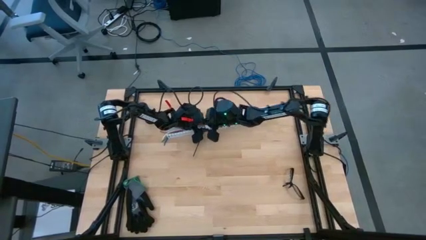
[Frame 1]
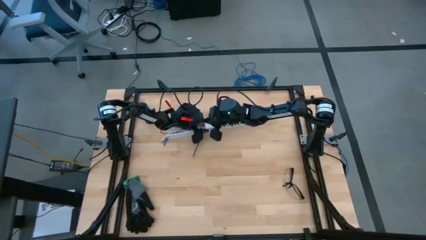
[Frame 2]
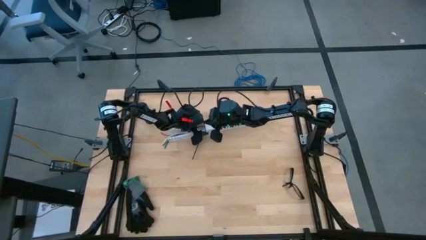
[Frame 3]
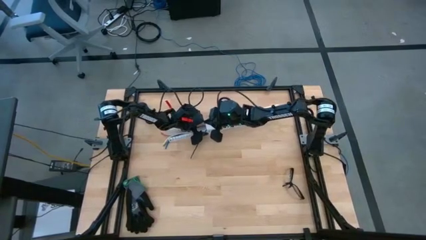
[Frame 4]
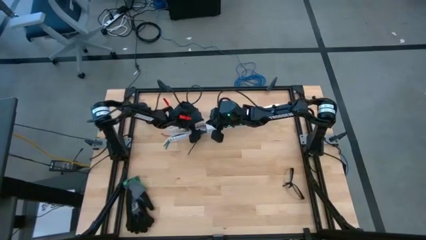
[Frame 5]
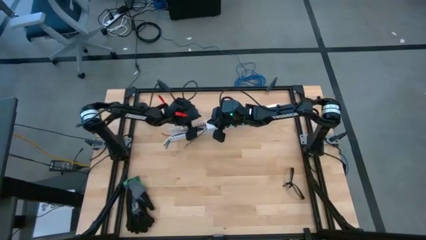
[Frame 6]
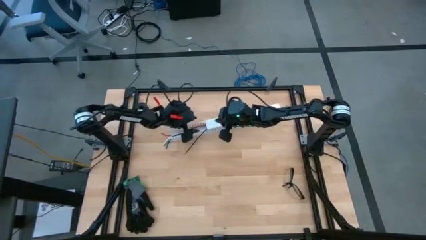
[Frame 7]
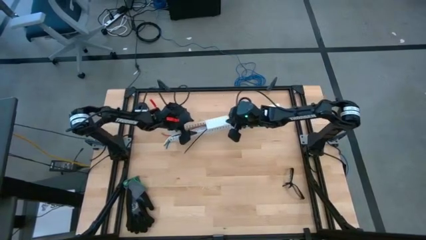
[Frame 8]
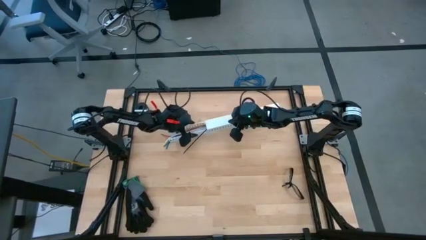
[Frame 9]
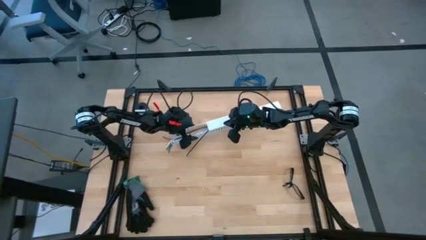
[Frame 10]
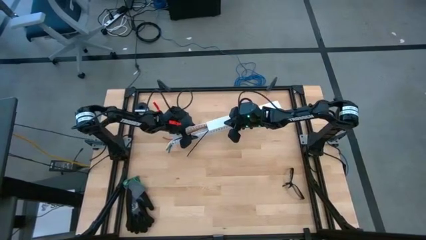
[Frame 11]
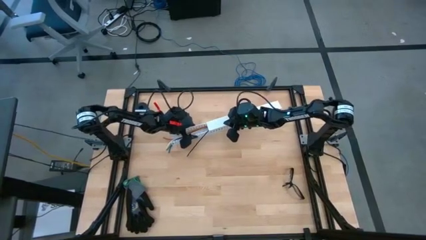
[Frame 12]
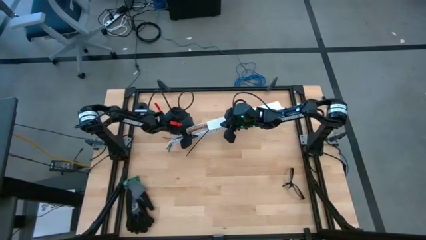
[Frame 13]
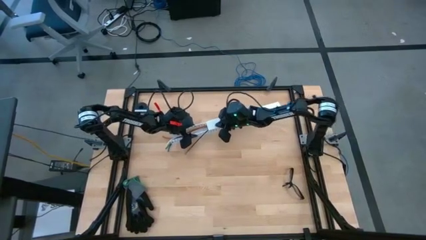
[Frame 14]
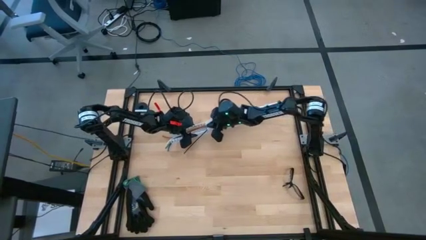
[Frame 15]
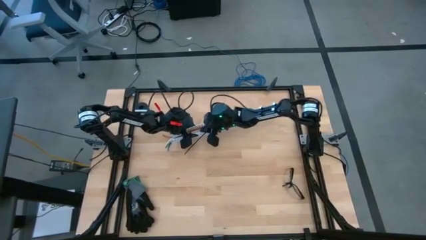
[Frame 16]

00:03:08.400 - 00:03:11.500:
Task: Ziptie cables
Close the white cable duct

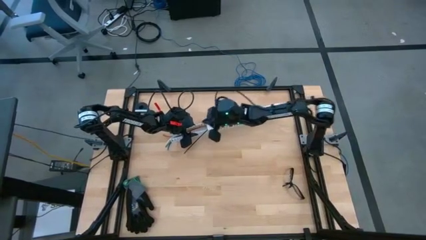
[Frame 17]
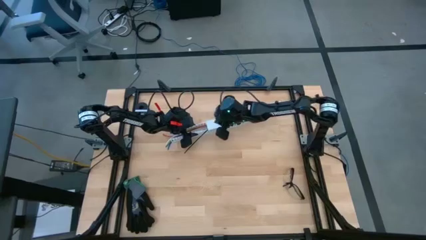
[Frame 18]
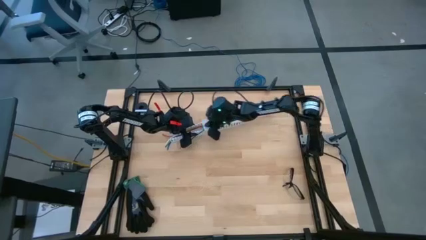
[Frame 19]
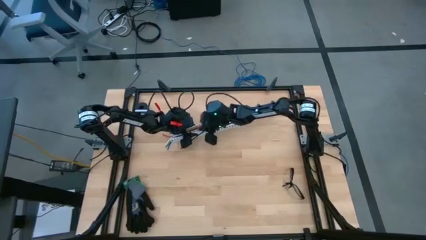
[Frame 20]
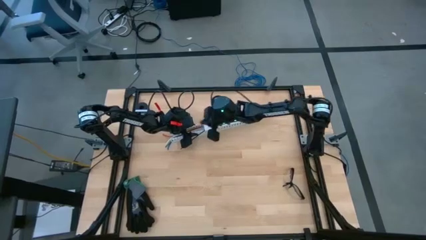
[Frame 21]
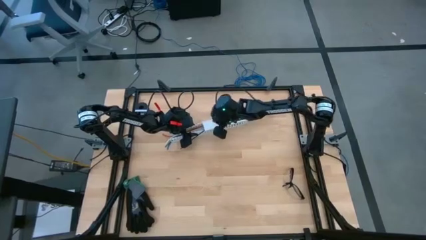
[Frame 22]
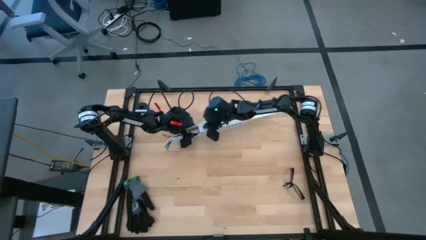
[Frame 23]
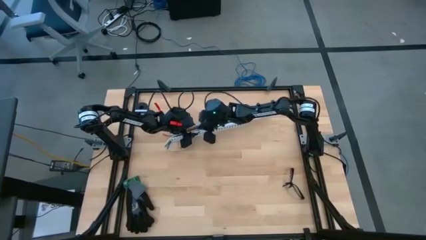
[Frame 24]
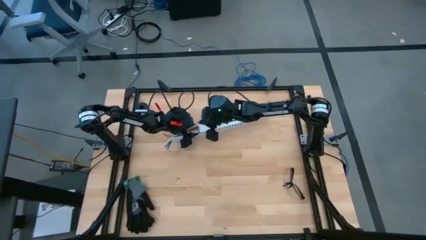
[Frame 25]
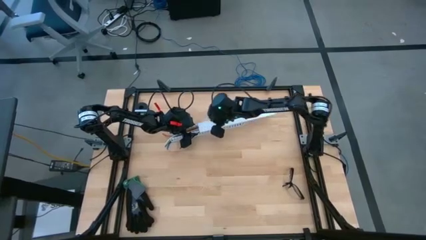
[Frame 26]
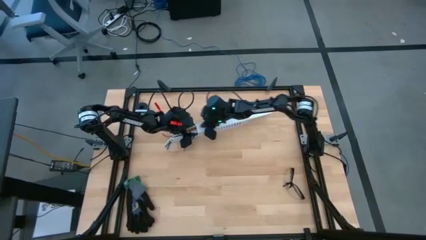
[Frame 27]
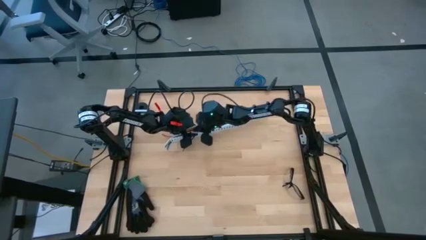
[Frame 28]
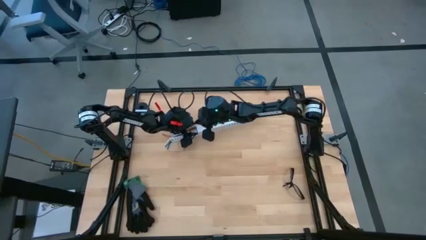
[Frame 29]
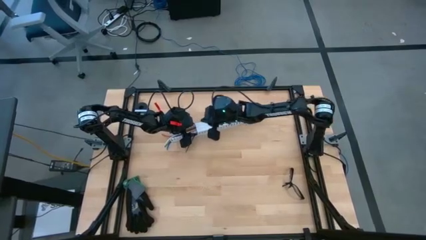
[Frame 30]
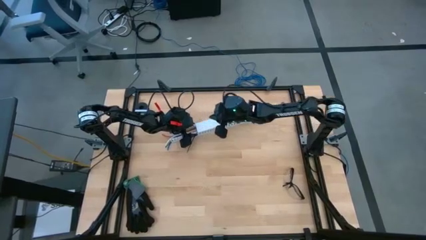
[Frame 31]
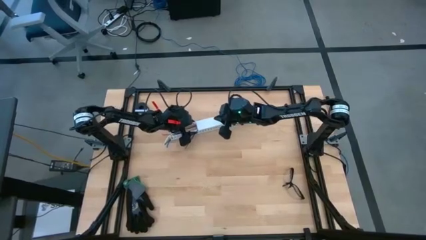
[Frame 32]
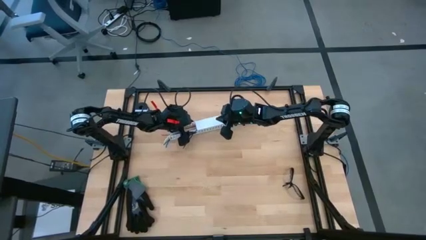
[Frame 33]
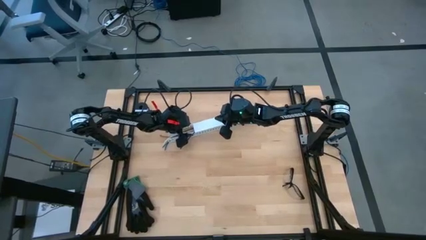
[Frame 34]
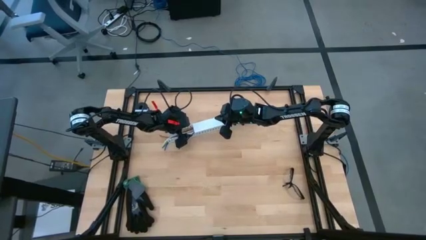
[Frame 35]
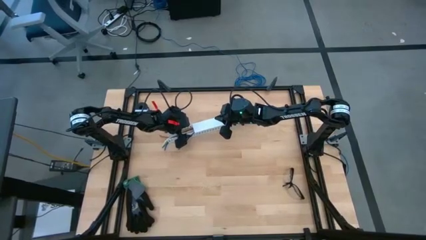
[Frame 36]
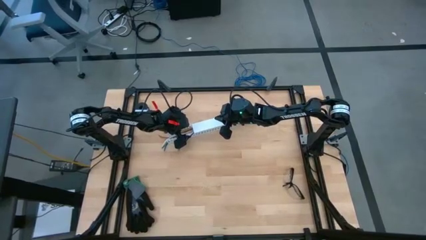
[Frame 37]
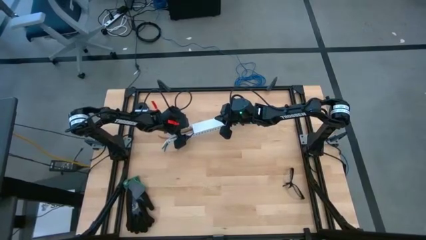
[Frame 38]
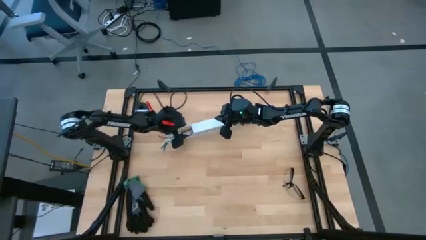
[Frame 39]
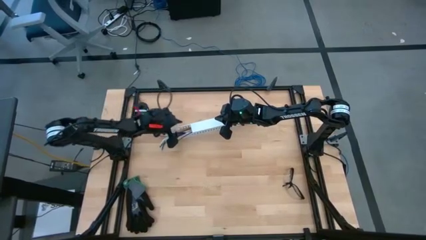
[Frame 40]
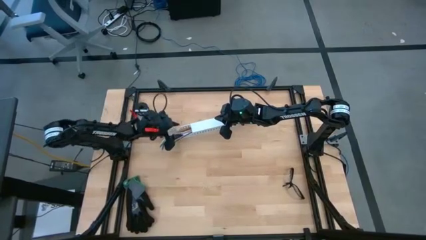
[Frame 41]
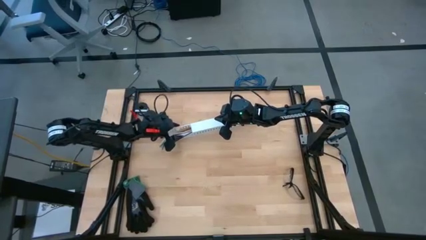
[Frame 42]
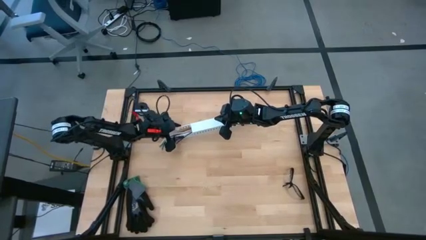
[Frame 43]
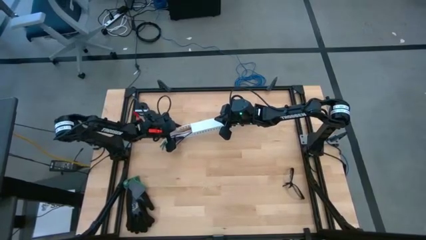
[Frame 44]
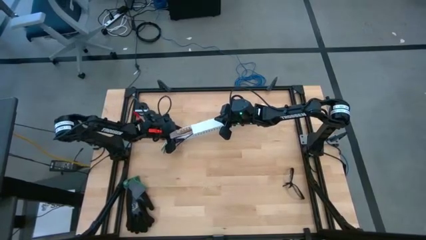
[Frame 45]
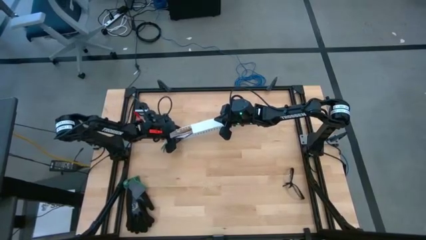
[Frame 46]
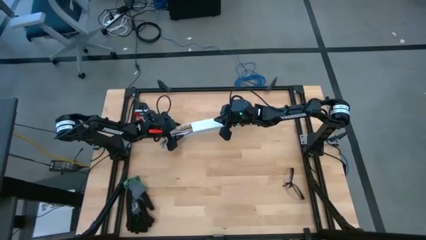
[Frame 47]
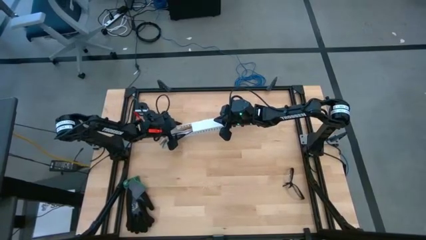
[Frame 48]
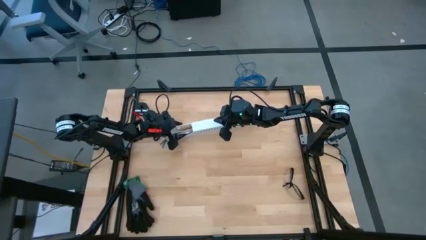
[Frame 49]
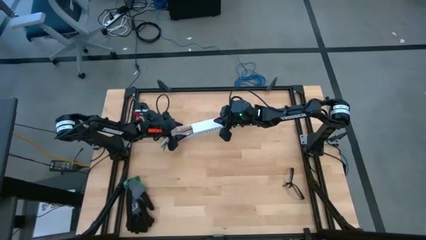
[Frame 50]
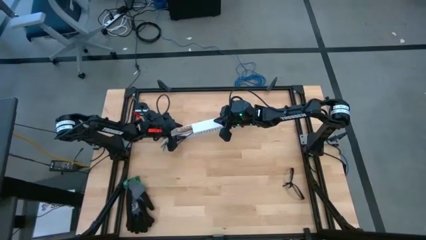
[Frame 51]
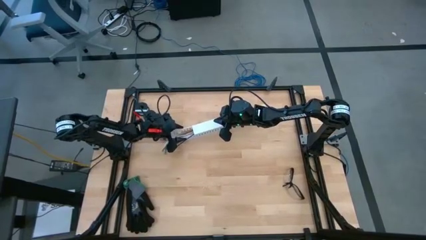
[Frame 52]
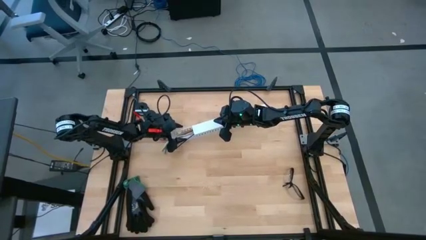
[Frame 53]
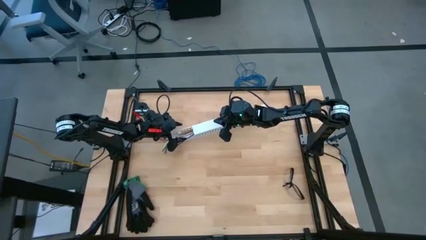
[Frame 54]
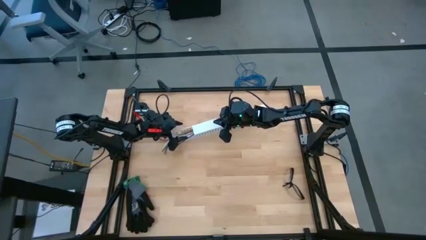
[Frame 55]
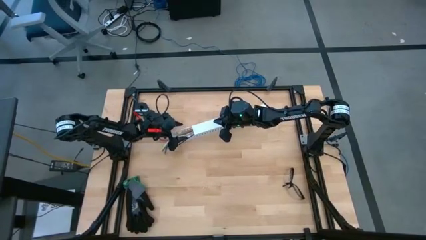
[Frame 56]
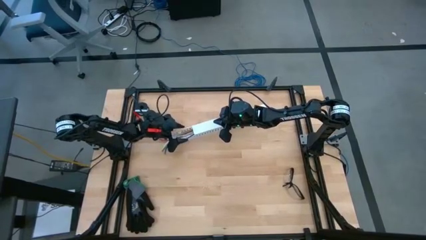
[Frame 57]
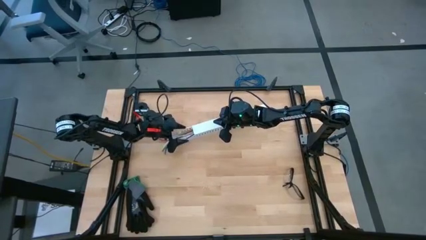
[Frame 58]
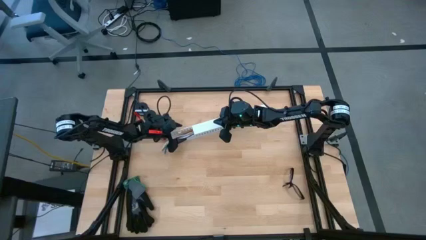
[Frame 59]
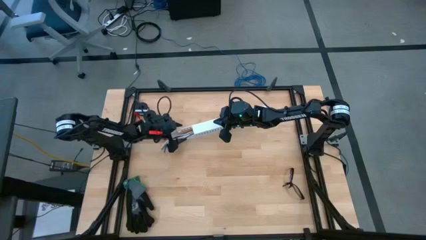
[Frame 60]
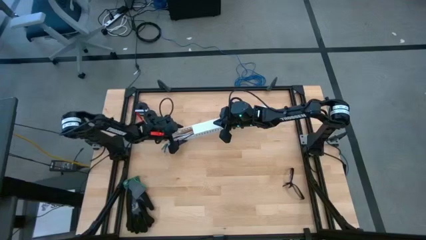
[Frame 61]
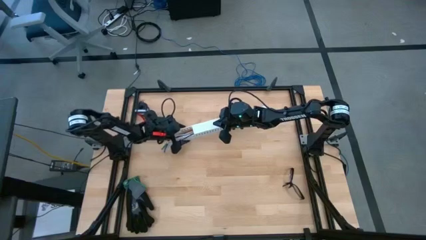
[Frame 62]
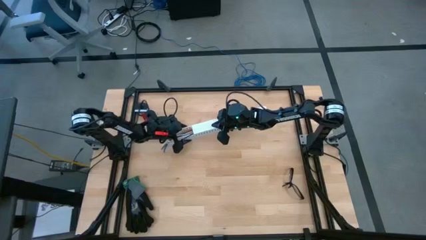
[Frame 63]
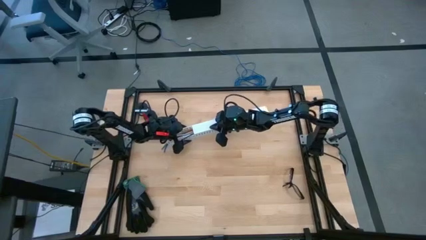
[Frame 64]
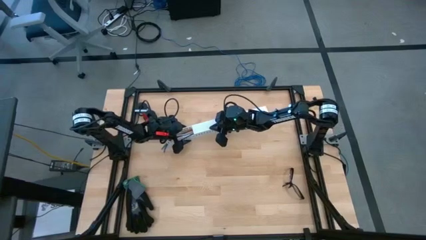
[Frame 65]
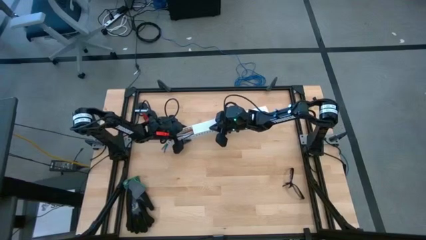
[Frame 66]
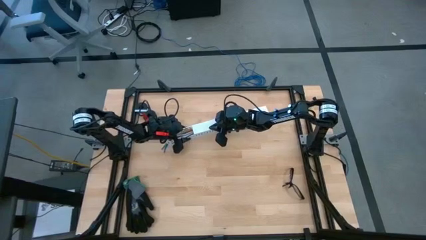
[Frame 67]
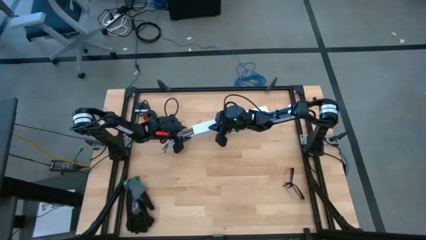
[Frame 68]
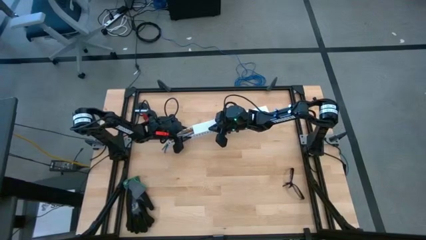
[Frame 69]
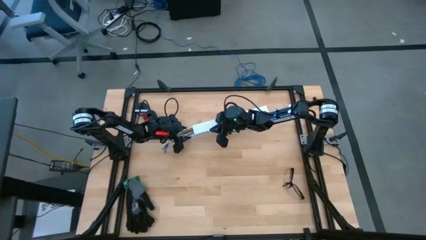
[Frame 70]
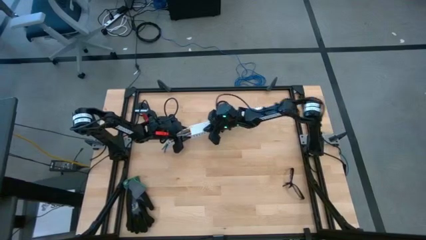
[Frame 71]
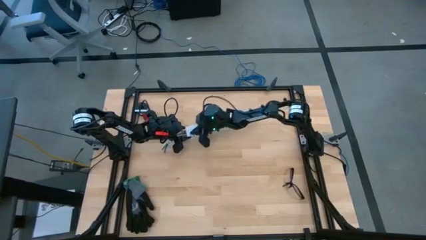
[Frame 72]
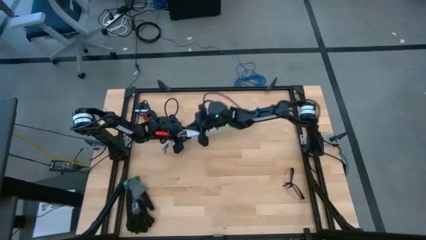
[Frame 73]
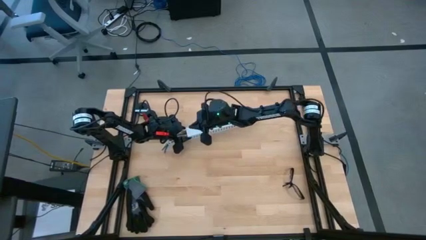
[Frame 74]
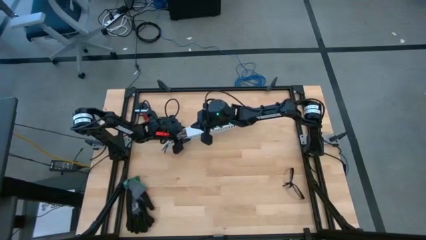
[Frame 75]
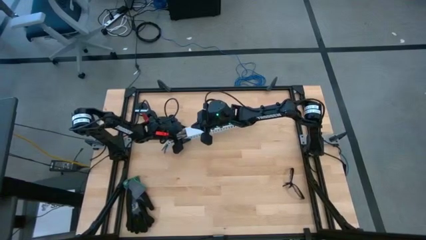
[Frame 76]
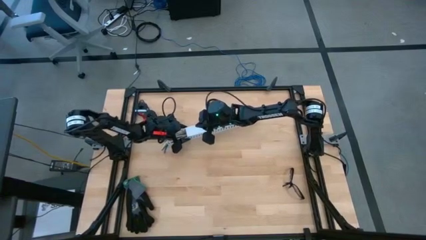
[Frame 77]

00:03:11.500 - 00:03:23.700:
Close the white cable duct

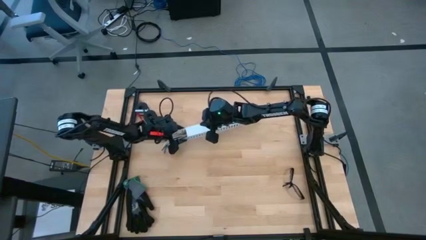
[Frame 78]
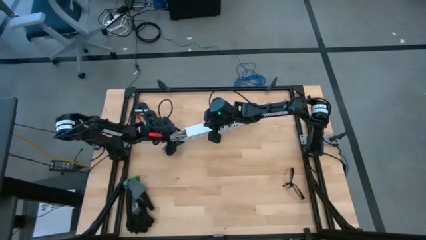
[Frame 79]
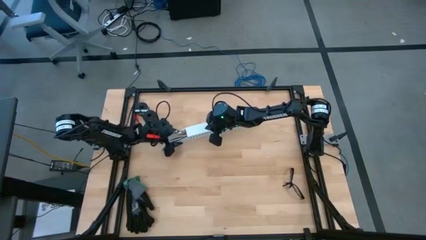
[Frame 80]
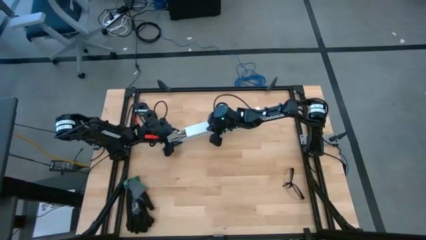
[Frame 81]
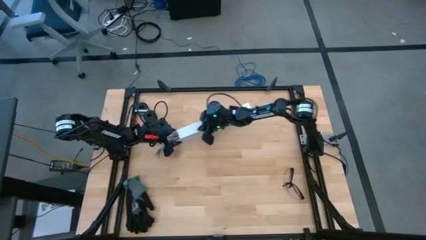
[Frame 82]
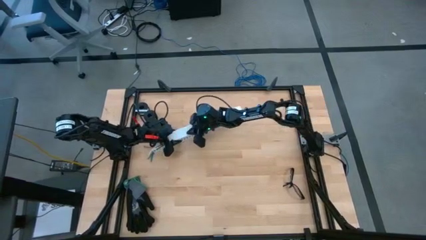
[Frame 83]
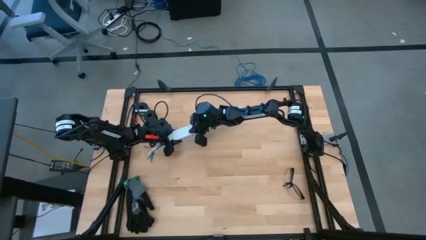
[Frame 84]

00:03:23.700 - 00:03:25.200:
Close the white cable duct
